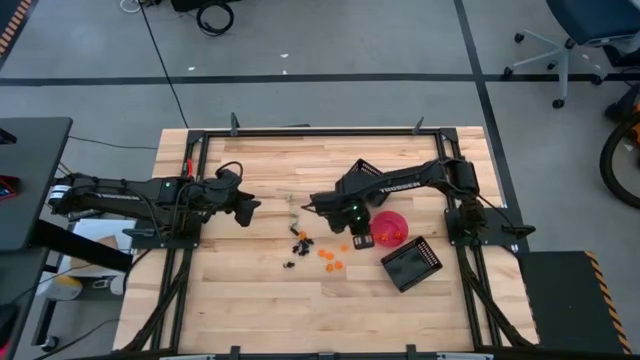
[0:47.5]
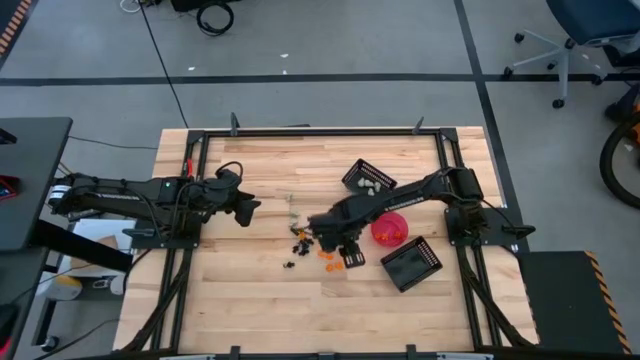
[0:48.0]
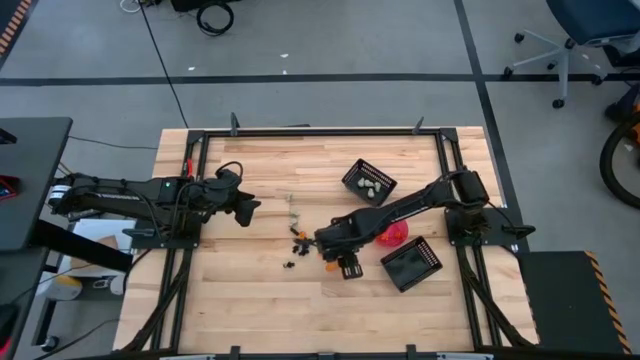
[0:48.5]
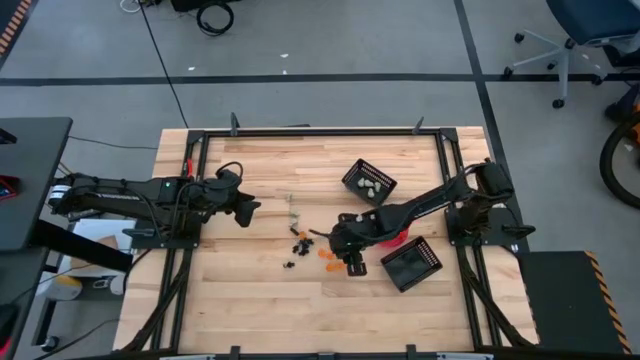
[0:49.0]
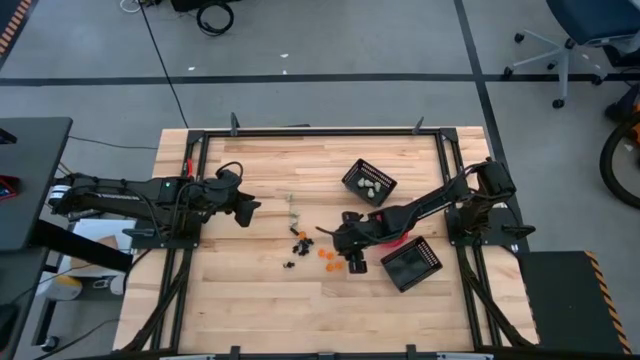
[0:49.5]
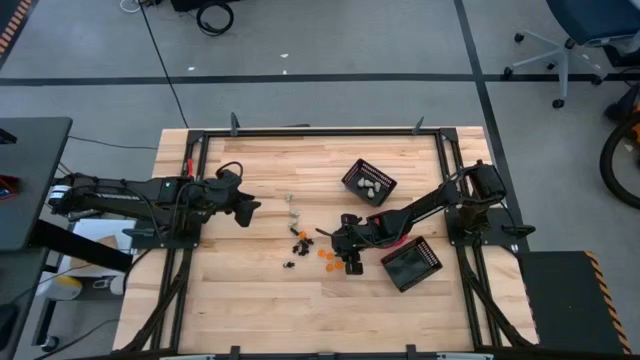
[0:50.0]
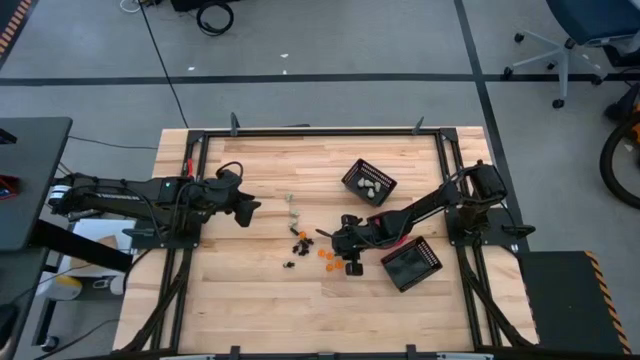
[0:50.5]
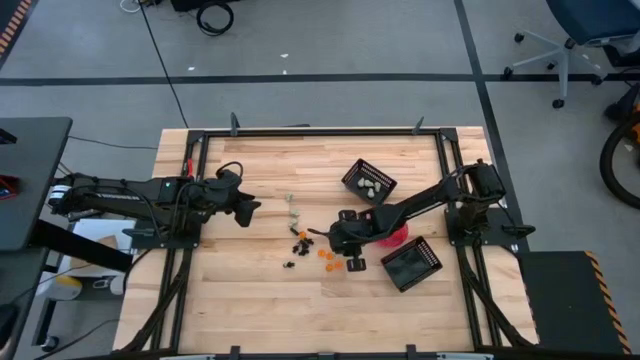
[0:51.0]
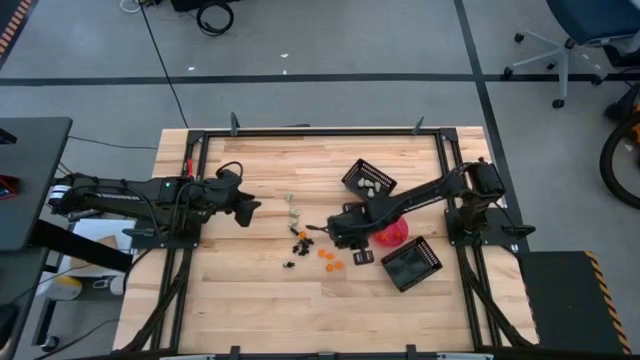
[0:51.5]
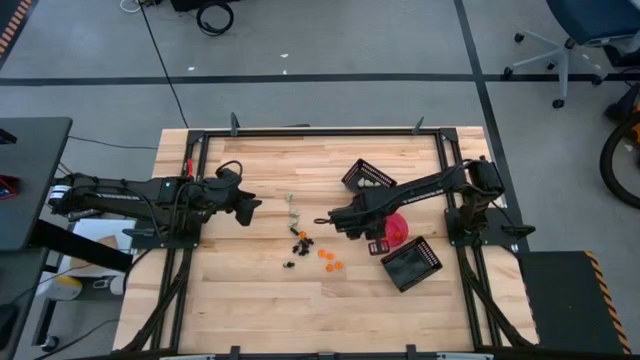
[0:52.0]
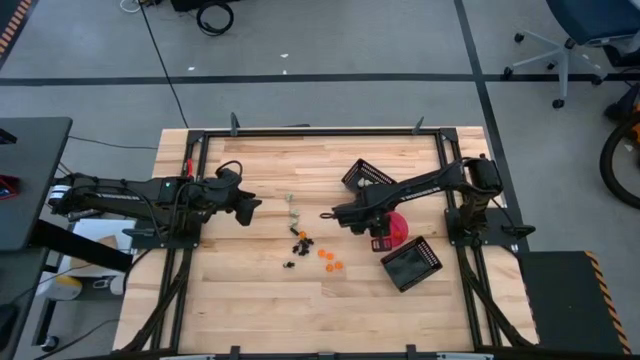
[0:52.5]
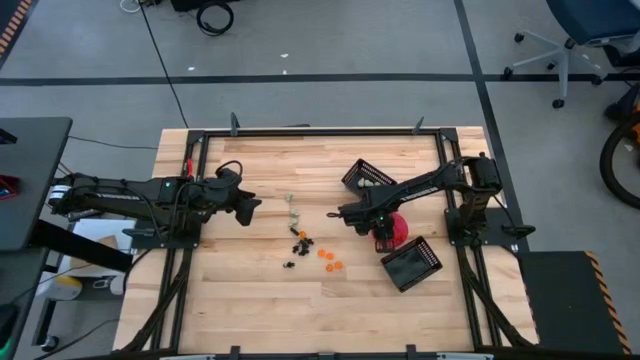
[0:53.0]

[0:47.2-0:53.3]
Task: Sort Halloween decoration
Put the orange pumpkin toy into the red bowl

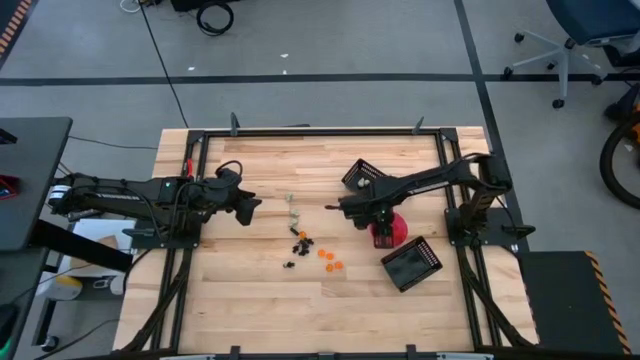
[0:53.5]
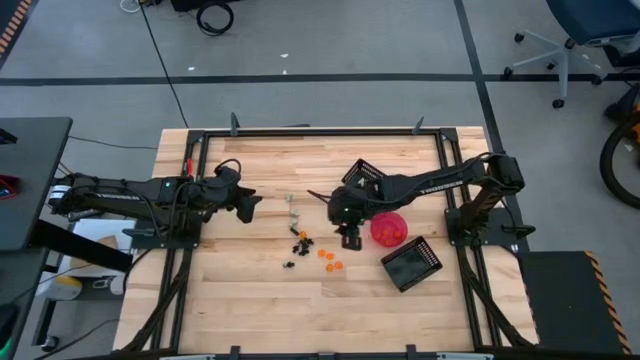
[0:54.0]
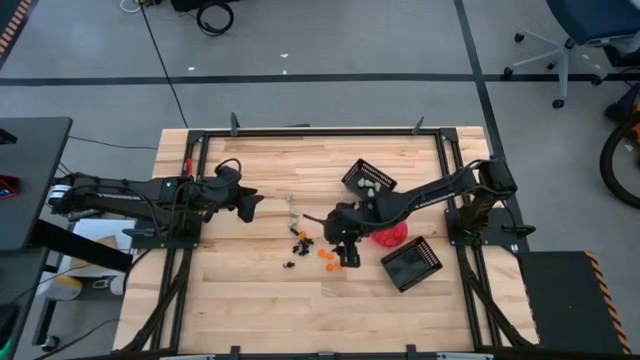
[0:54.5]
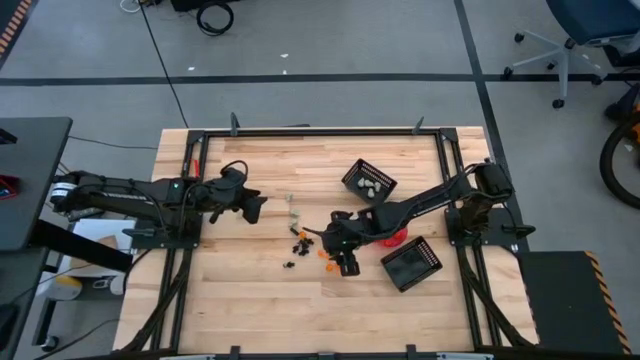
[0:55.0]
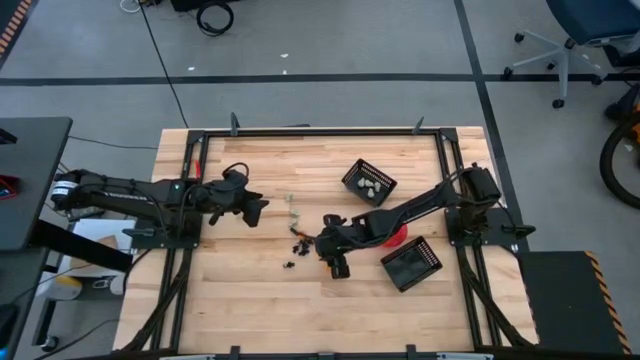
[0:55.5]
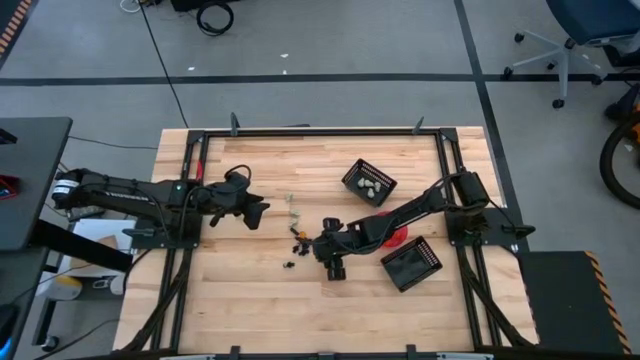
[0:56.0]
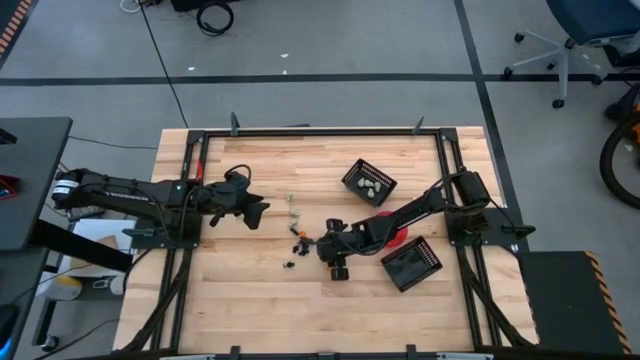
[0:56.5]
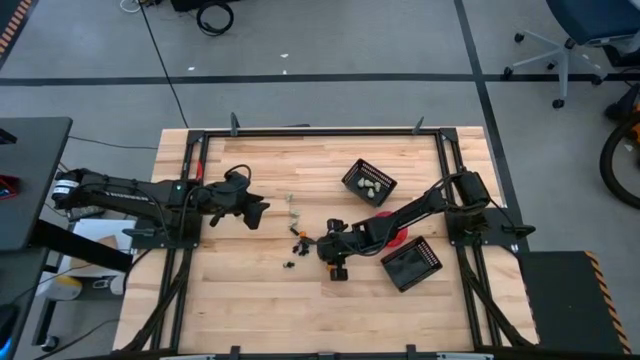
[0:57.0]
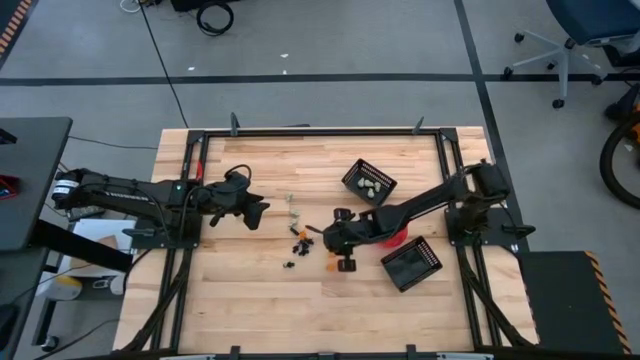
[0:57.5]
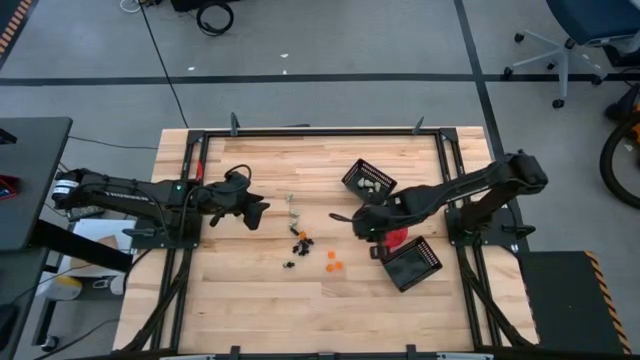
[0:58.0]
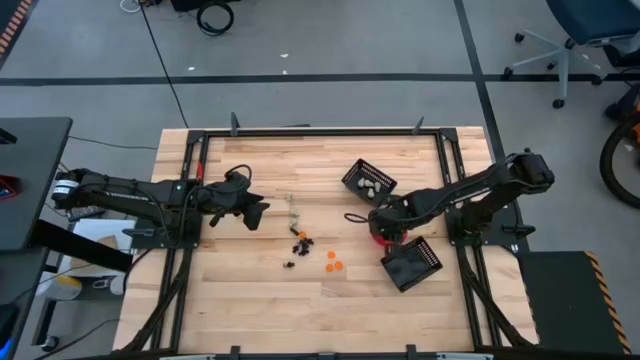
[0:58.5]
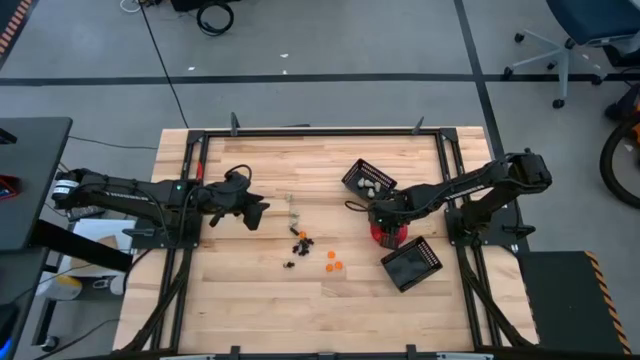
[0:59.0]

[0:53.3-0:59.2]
Put the orange pumpkin toy into the red bowl

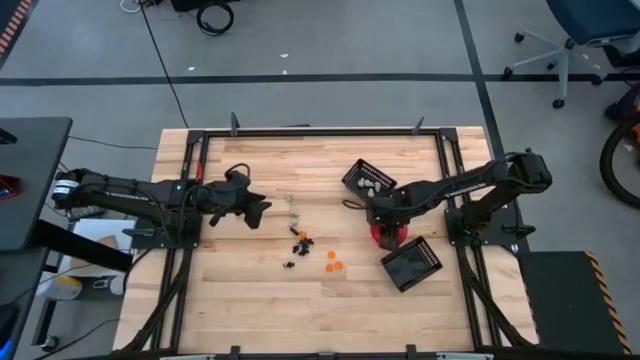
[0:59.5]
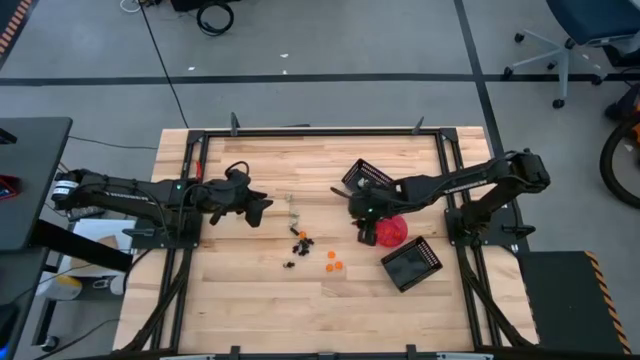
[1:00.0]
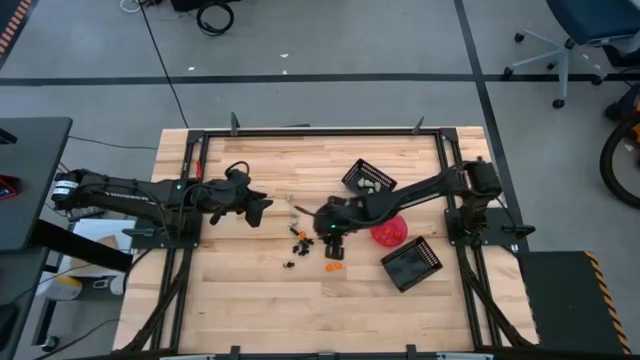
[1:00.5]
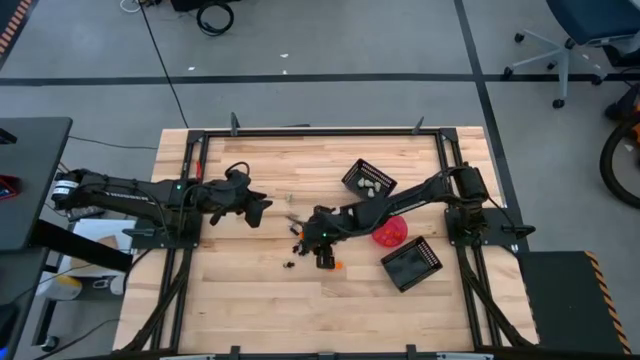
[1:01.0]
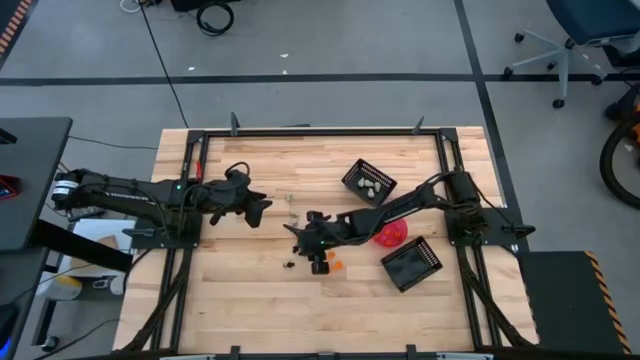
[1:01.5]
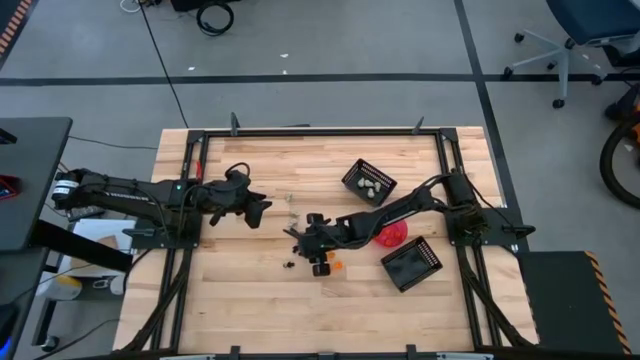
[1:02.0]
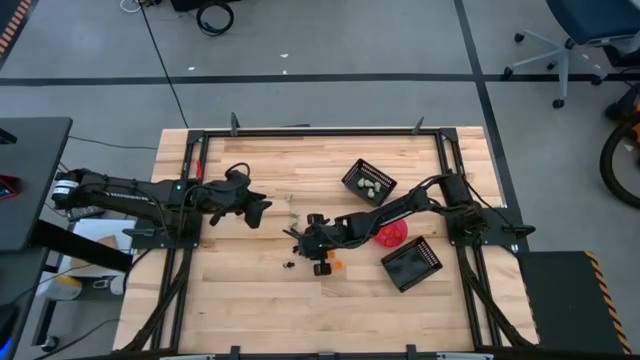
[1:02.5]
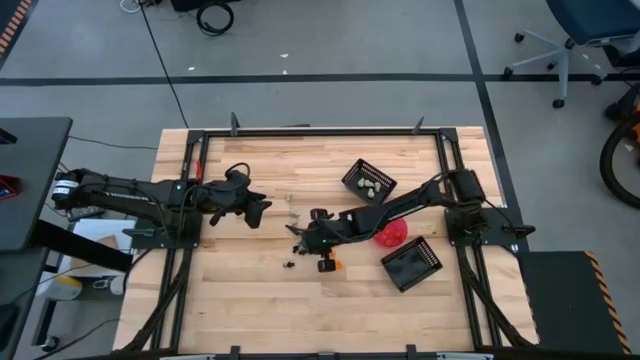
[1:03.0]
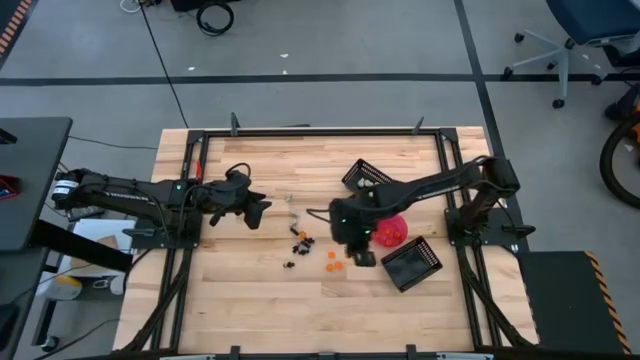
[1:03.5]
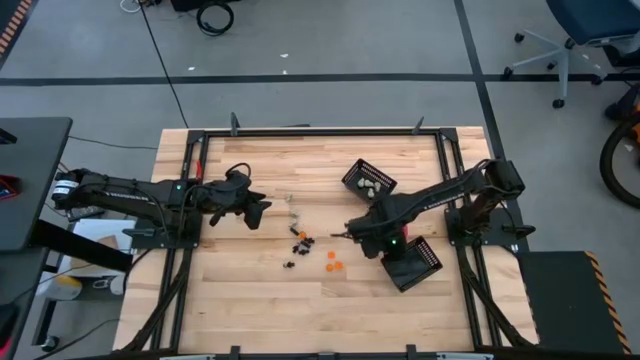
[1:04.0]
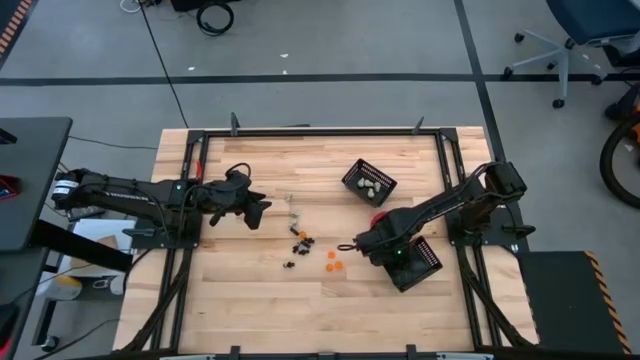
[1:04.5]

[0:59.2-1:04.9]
Put the black skeleton toy into the bottom black basket

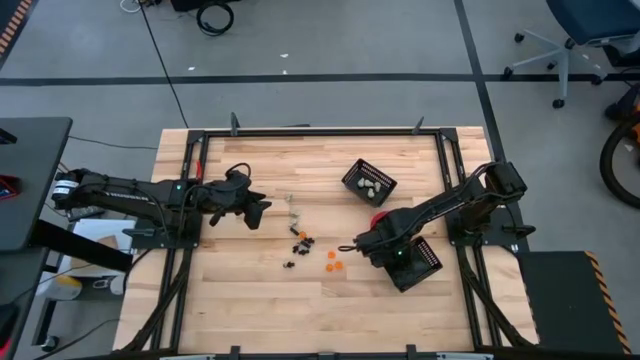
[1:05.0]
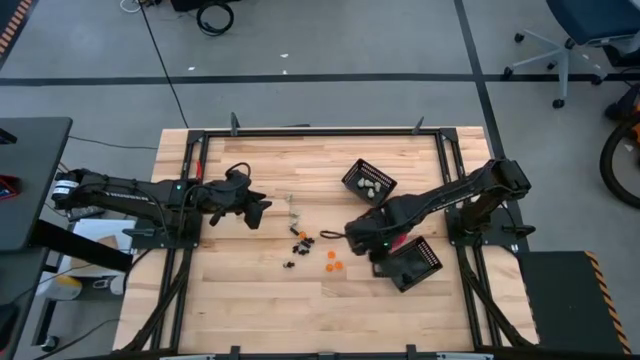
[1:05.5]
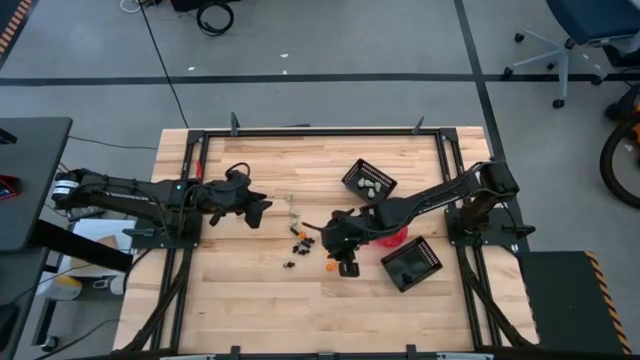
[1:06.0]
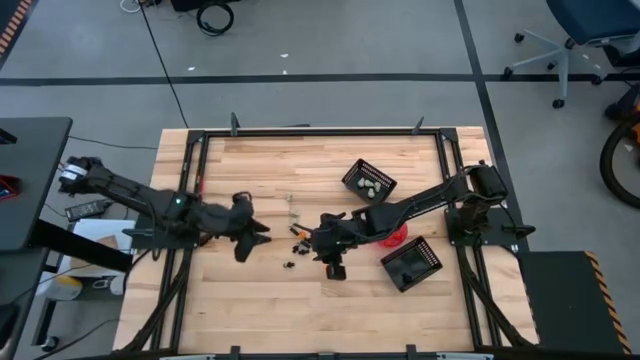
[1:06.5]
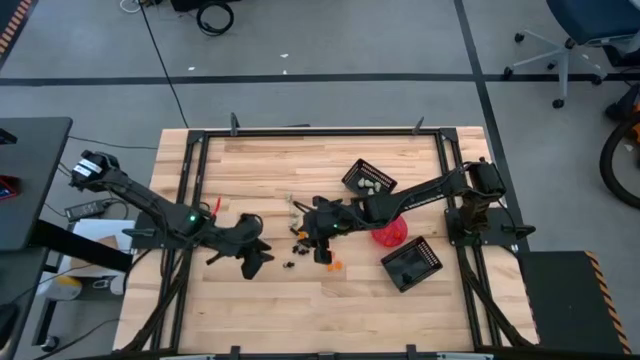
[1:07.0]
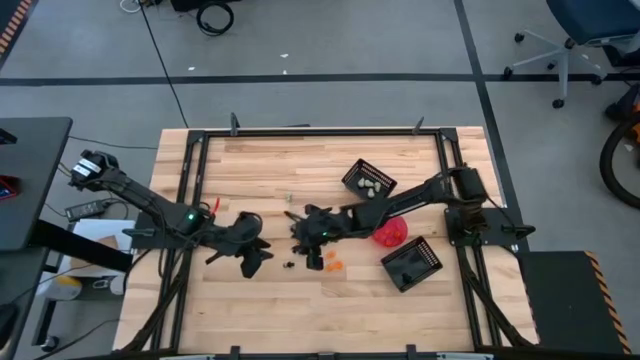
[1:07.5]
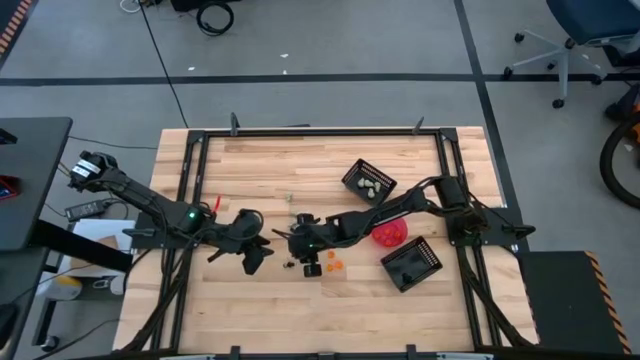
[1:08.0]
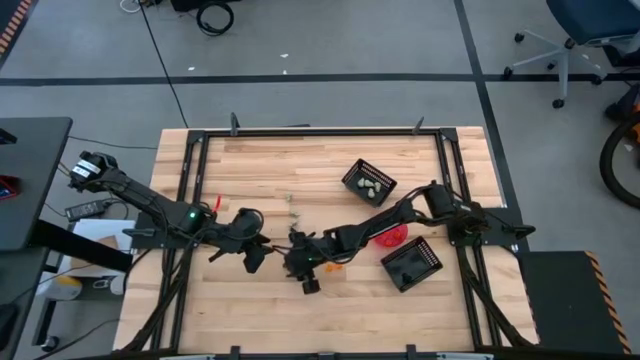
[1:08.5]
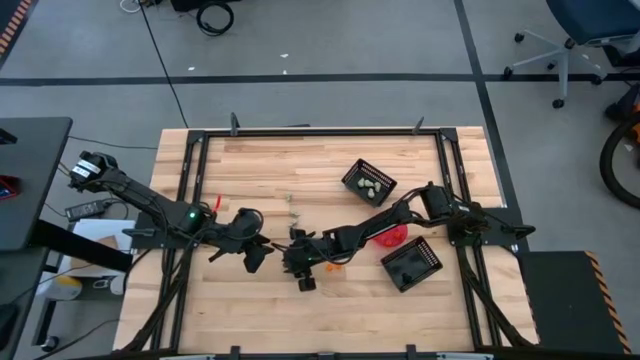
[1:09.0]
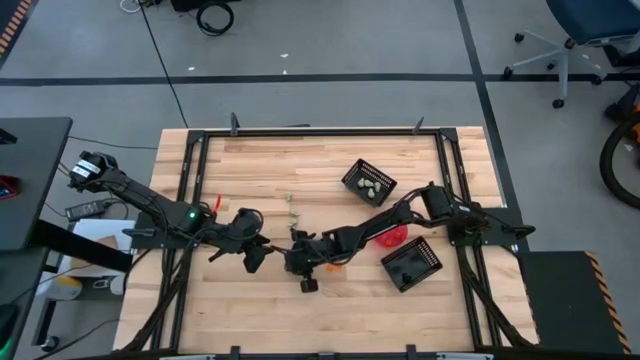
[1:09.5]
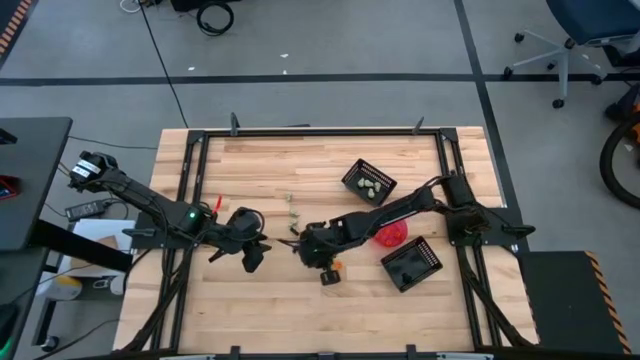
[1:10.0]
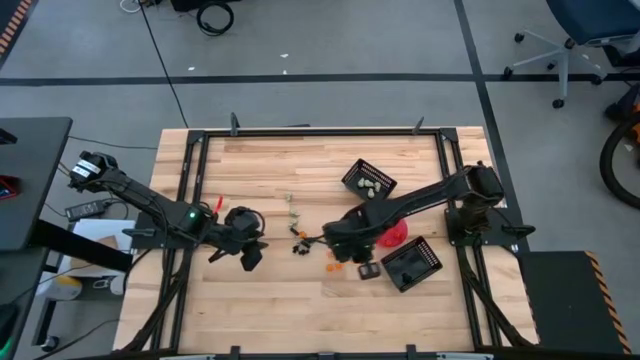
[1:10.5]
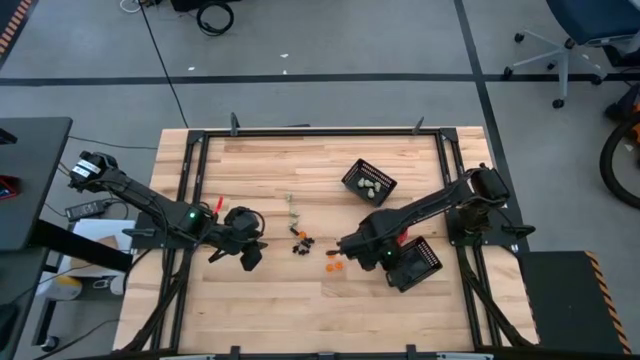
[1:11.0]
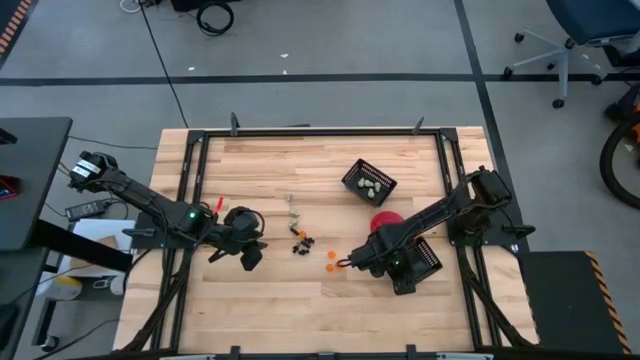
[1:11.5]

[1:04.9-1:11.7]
Put the black skeleton toy into the bottom black basket
